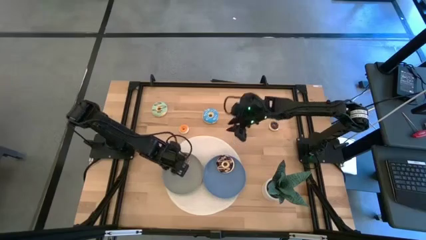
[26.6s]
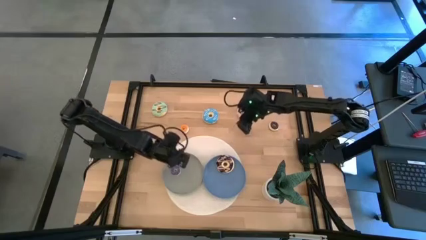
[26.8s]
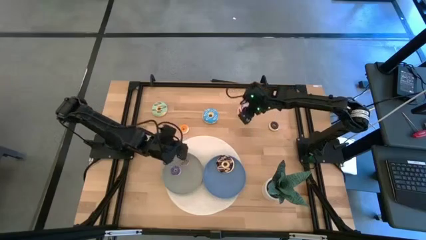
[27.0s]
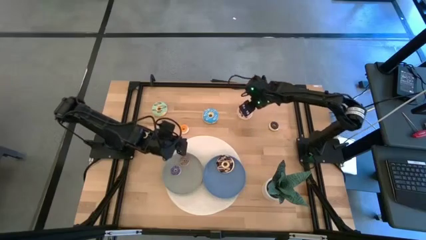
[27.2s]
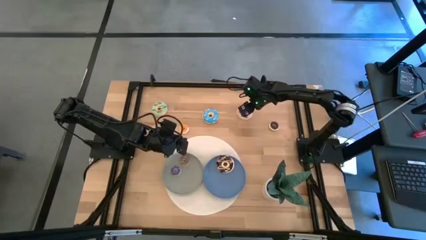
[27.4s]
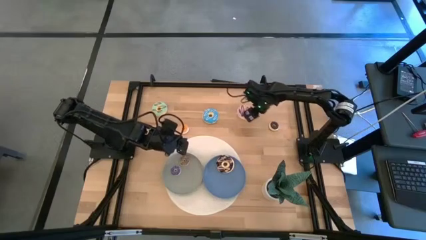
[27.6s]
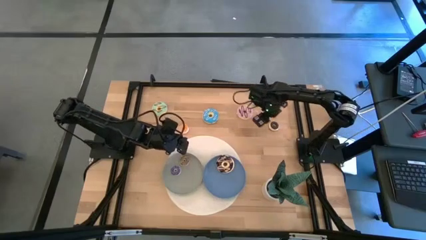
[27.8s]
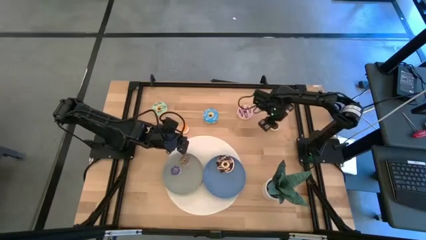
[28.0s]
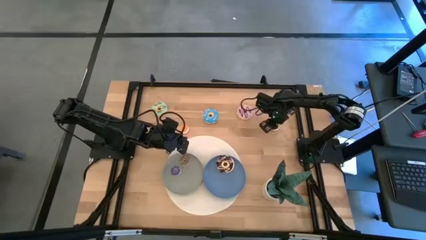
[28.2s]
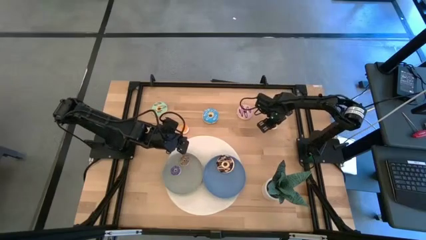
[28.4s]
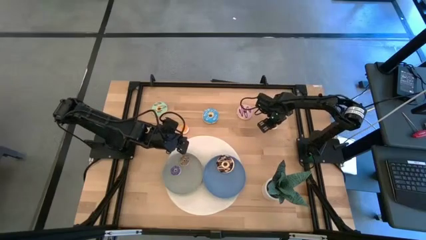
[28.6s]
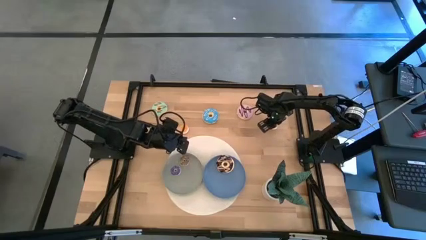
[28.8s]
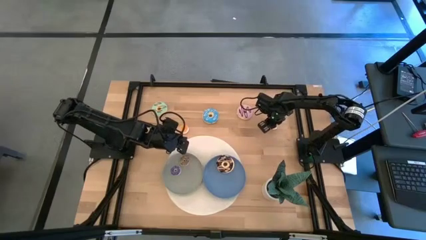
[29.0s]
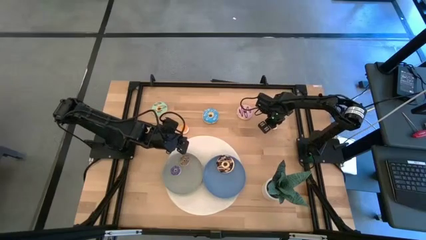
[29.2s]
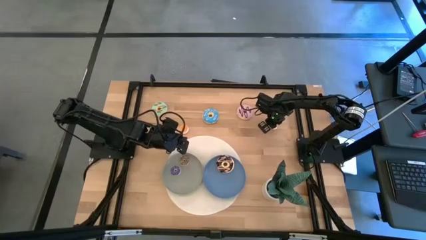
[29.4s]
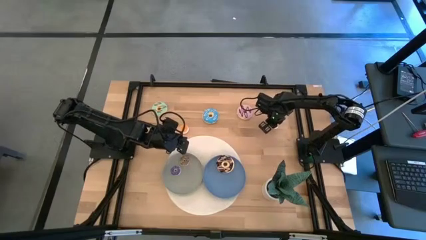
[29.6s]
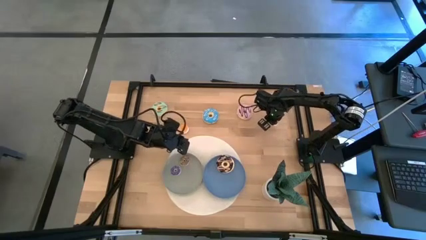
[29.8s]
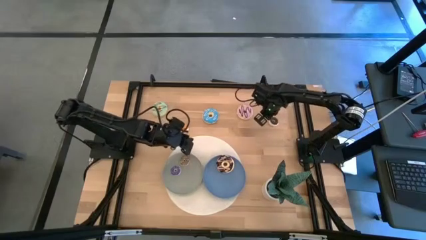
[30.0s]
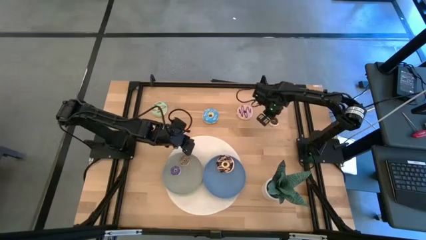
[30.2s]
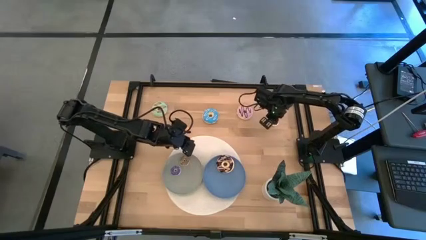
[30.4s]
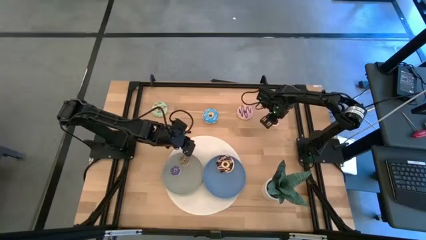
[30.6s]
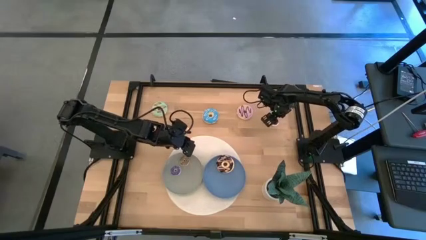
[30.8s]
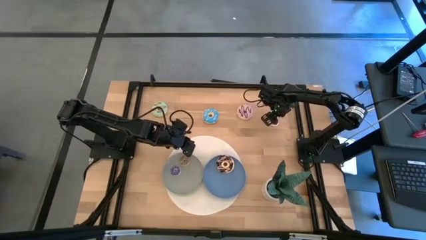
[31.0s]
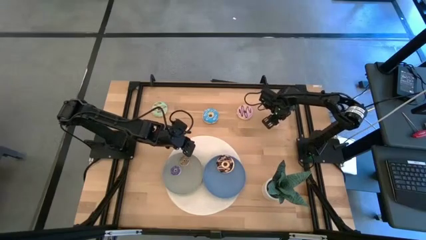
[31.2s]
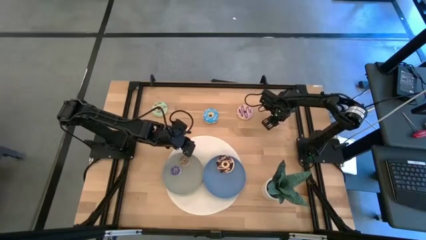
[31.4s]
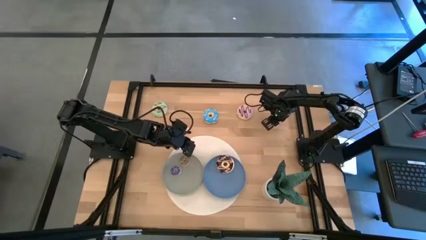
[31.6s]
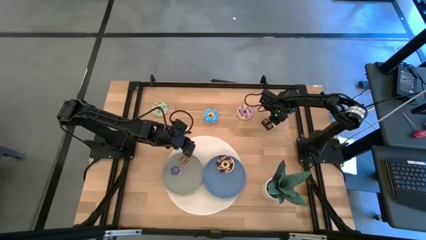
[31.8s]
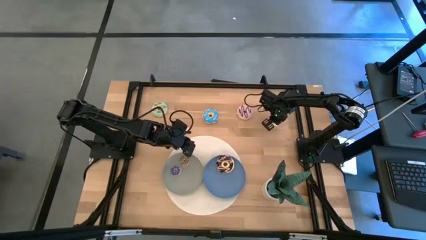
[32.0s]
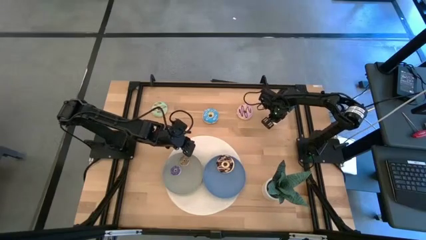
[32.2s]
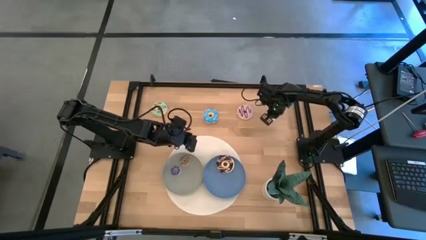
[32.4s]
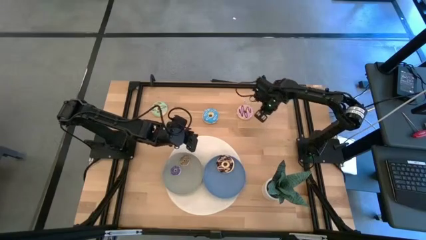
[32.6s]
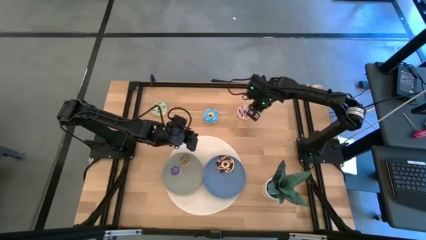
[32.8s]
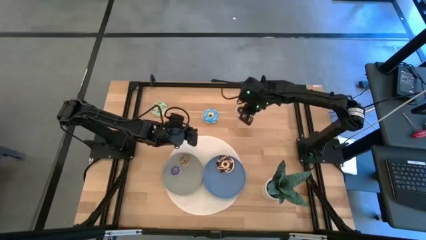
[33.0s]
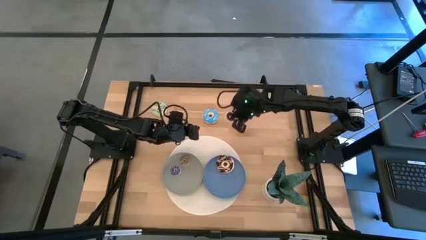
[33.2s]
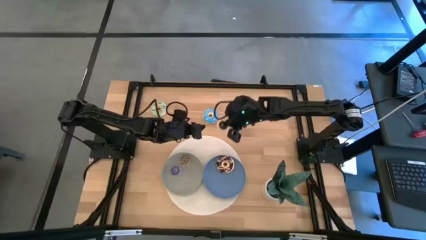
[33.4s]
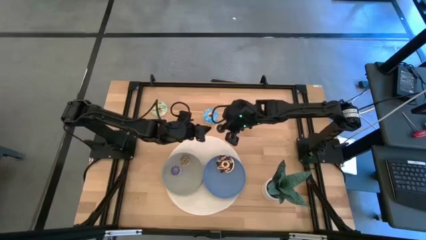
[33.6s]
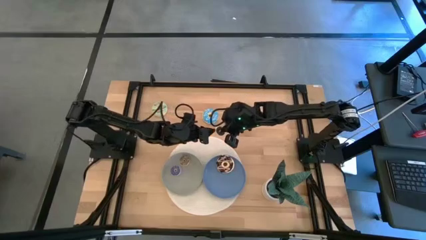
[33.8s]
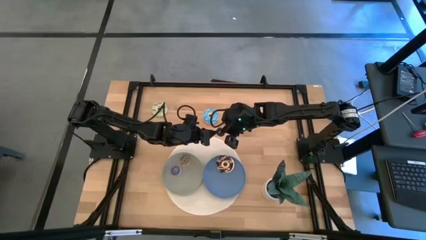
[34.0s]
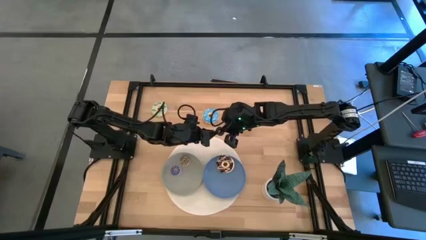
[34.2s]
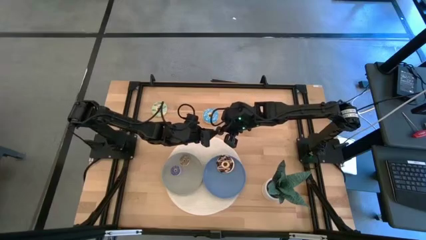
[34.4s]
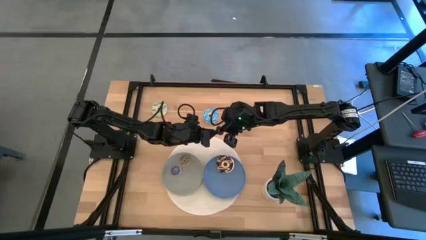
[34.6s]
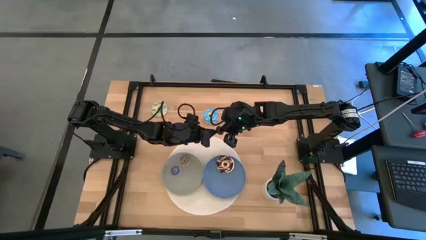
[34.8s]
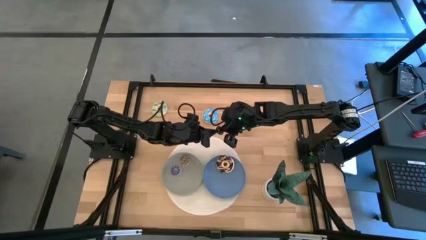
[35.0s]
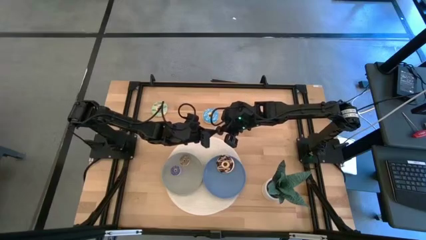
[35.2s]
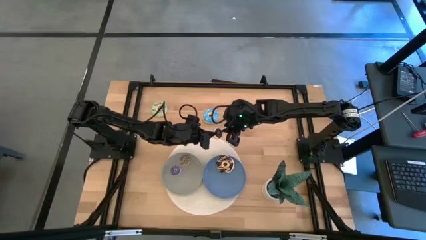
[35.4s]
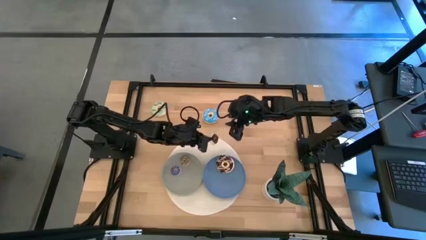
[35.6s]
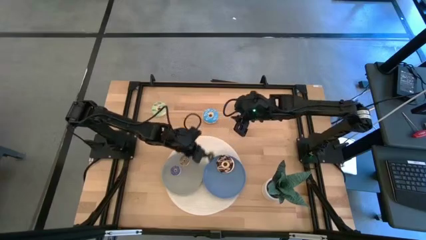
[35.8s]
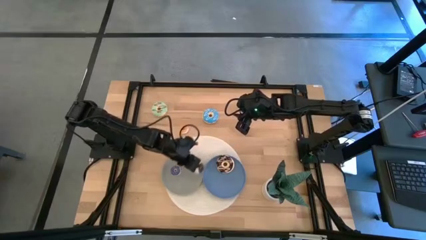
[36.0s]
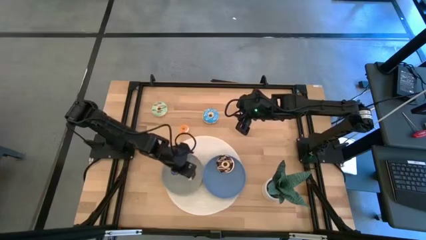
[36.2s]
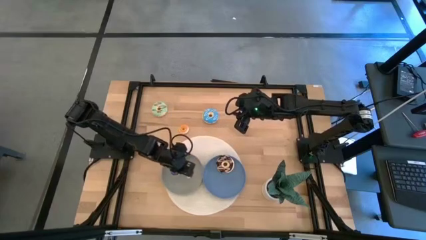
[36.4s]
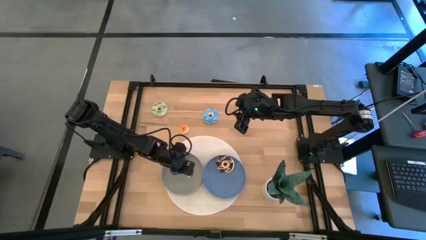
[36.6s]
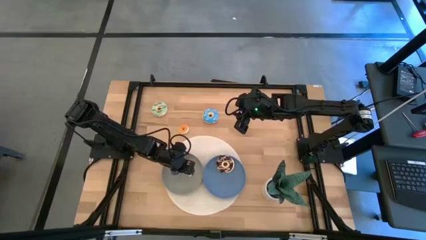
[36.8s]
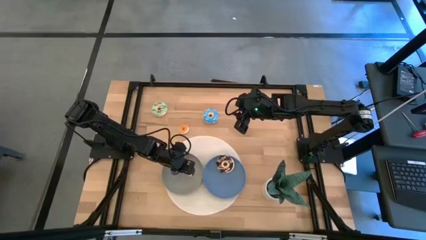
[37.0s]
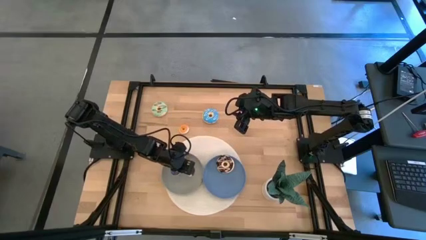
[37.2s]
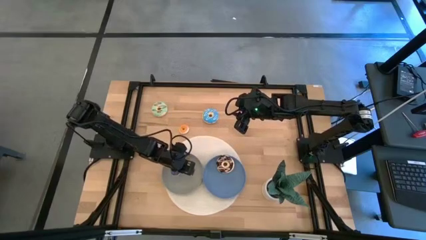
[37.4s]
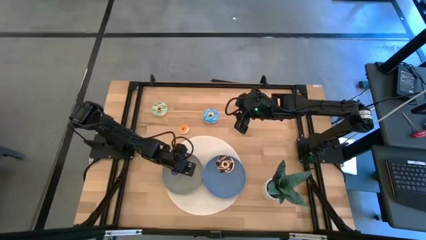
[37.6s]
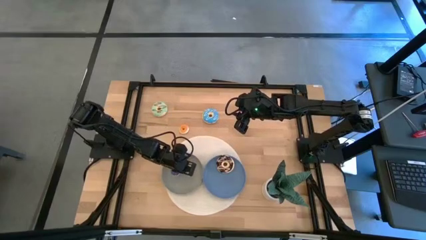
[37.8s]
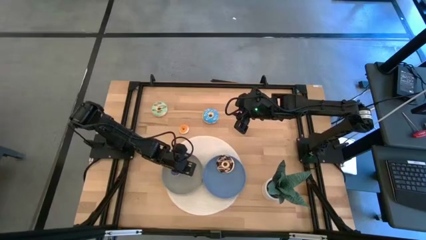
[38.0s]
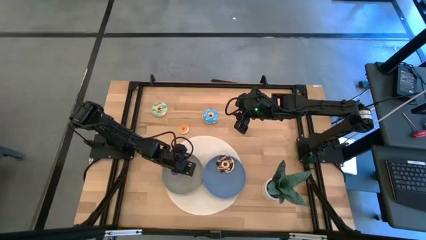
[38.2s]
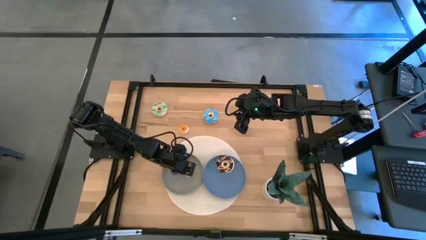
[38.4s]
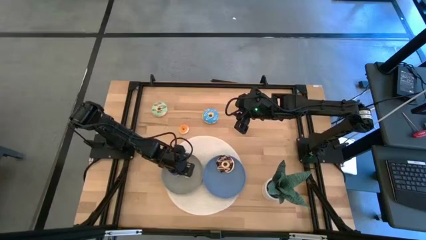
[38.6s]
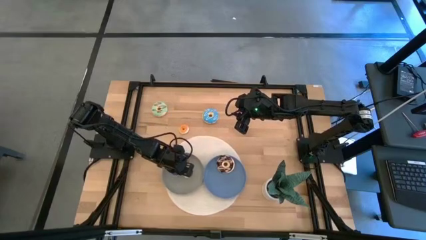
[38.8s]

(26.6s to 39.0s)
Task: Pick & Place donuts
Put the small black donut on the gray plate

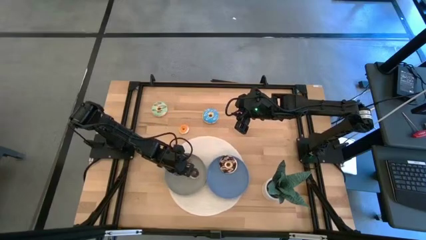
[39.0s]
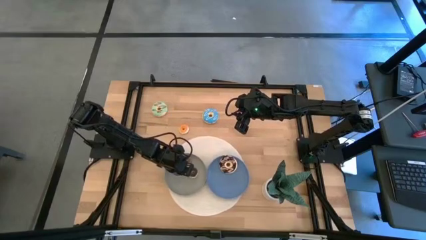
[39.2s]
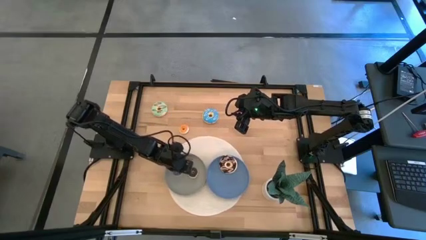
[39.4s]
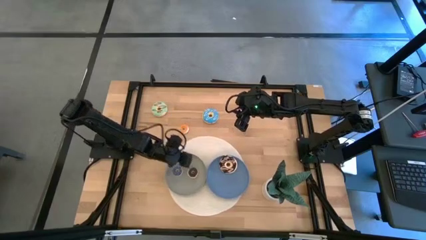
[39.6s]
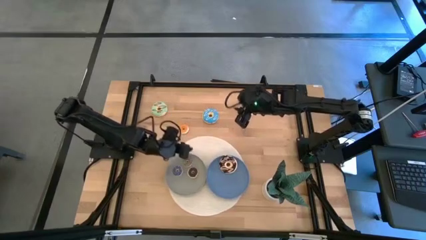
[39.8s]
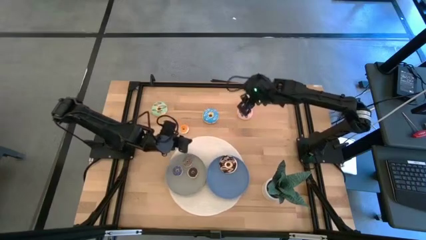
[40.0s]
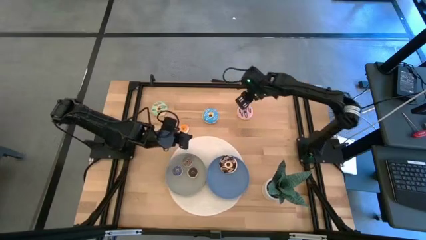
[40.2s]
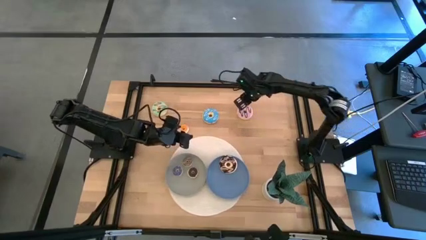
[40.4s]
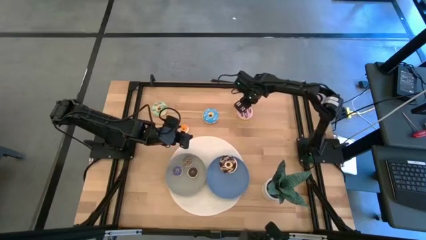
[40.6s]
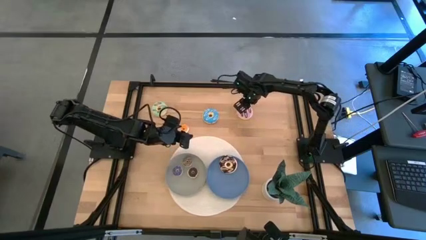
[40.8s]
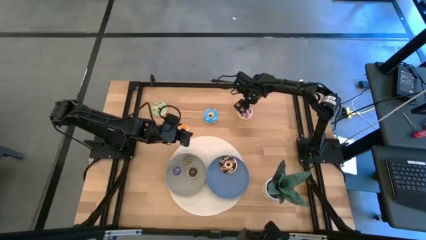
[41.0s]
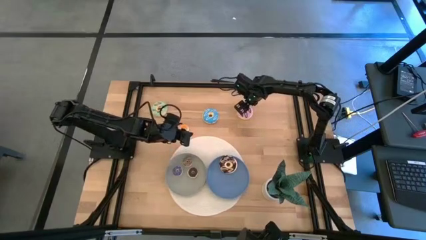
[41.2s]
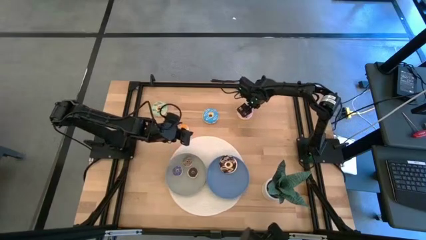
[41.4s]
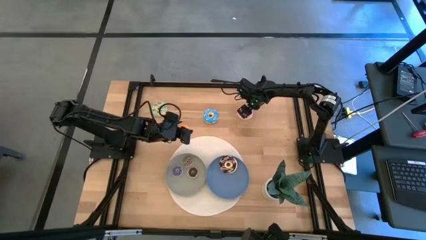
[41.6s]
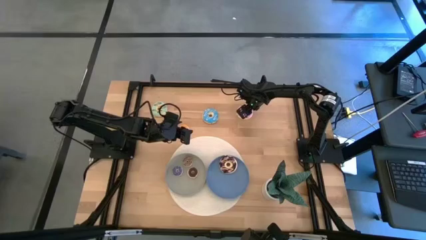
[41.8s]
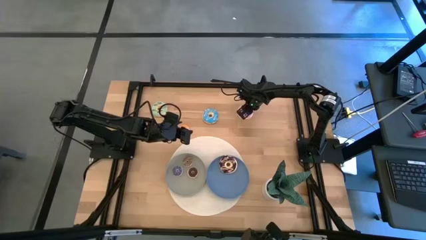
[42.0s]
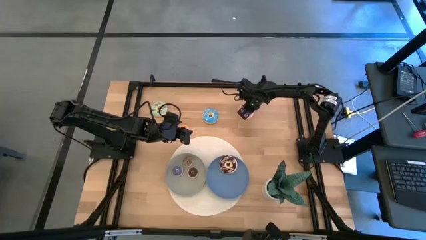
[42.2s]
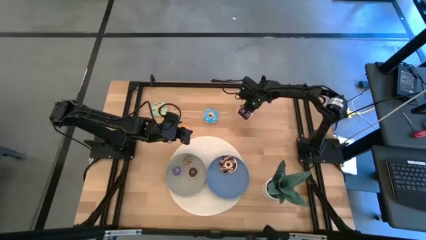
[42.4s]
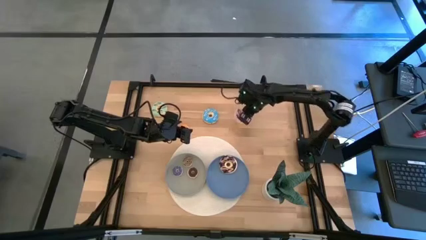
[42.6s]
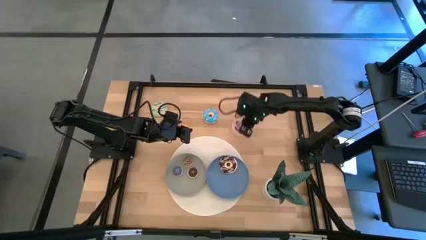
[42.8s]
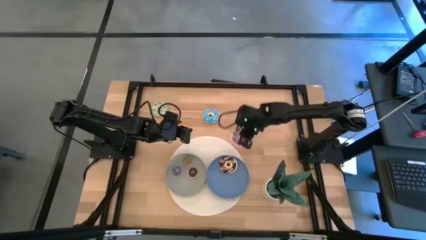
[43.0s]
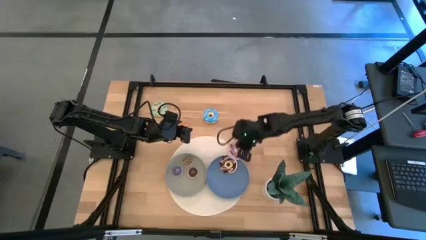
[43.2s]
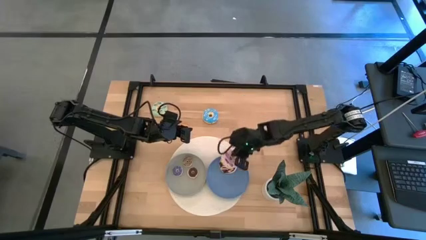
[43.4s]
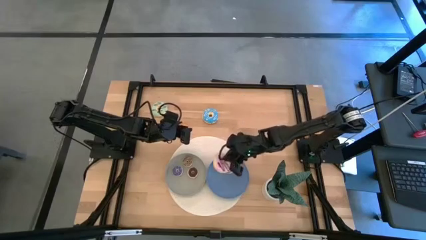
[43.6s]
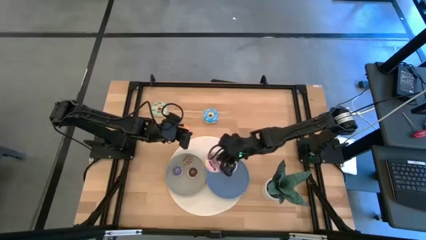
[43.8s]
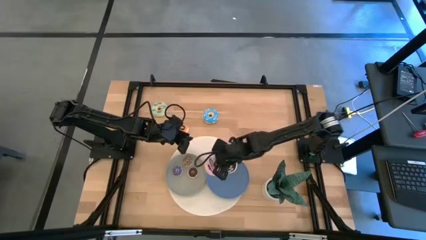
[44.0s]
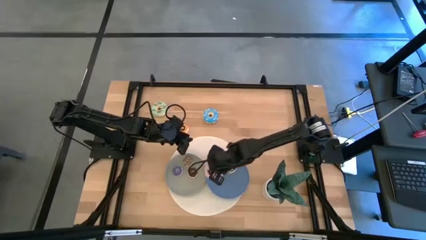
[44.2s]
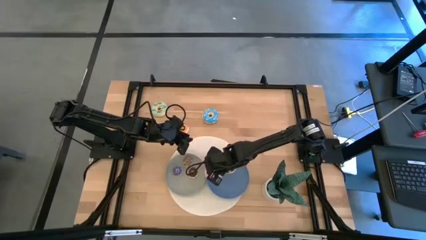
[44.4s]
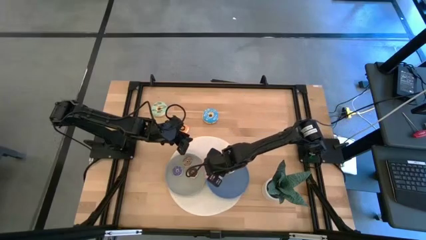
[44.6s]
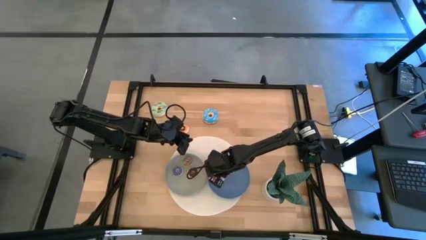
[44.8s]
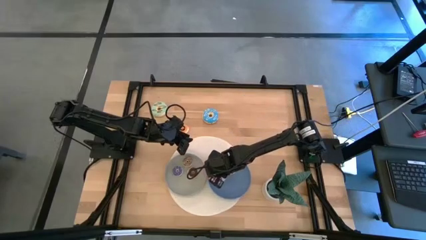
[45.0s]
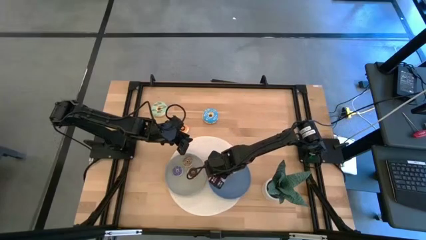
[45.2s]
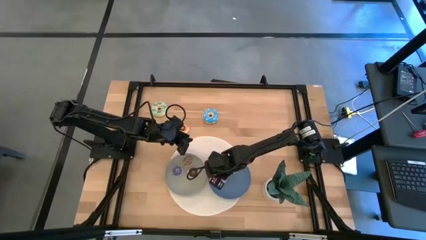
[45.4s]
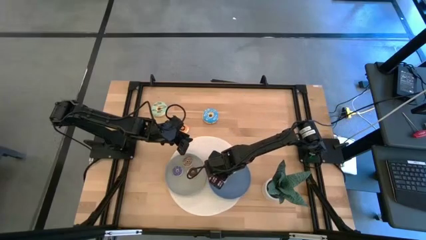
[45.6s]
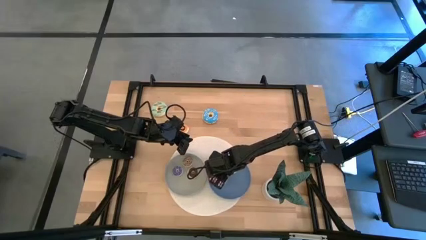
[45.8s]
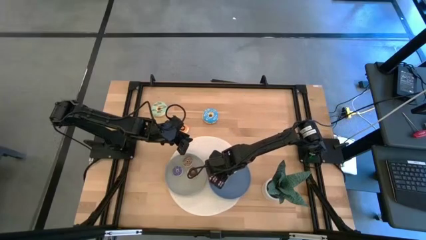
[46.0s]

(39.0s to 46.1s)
Put the big violet donut on the blue plate
